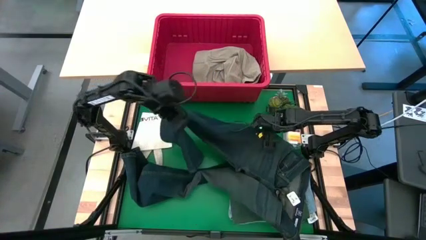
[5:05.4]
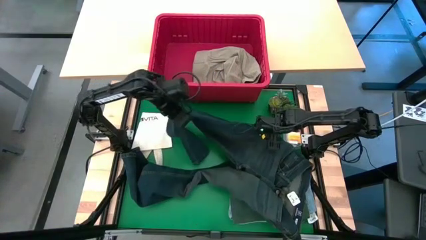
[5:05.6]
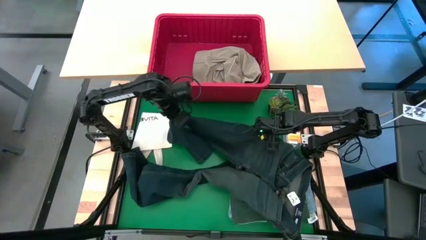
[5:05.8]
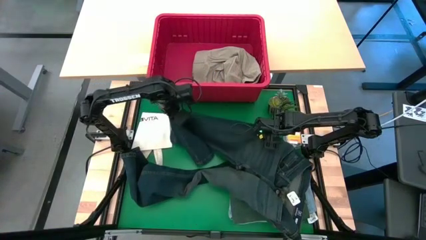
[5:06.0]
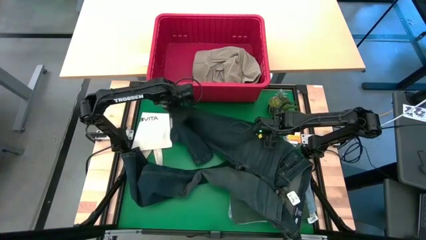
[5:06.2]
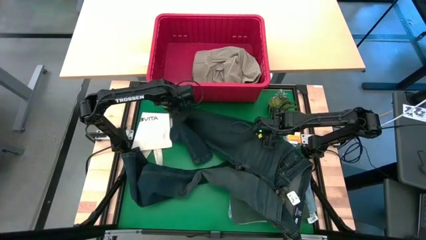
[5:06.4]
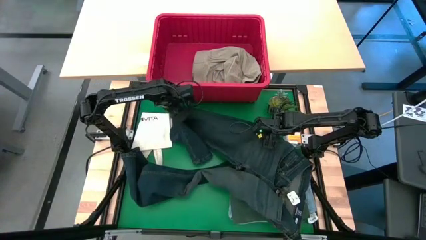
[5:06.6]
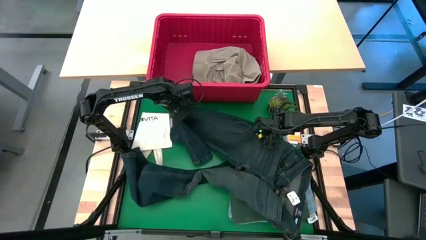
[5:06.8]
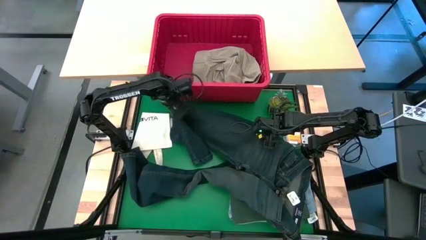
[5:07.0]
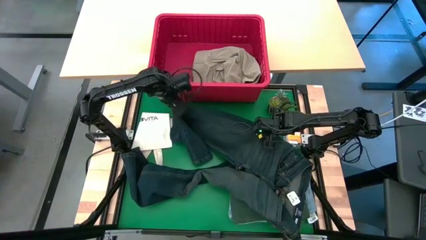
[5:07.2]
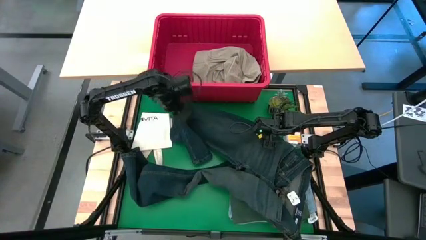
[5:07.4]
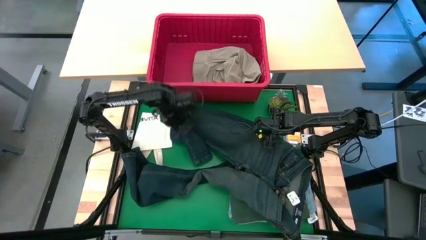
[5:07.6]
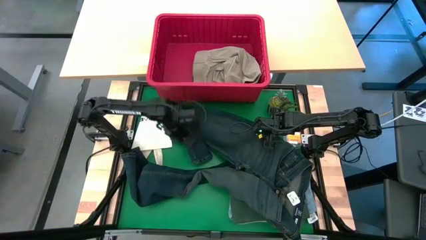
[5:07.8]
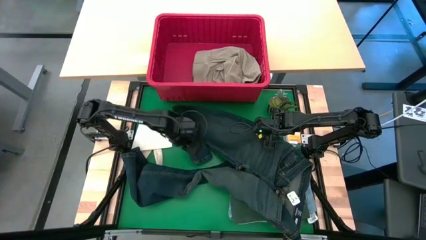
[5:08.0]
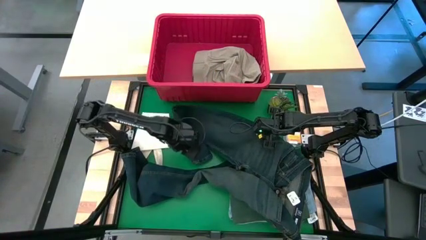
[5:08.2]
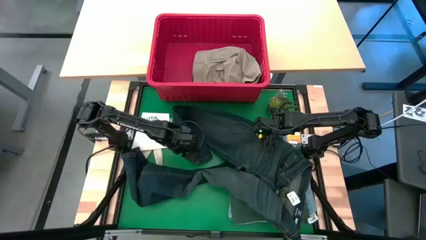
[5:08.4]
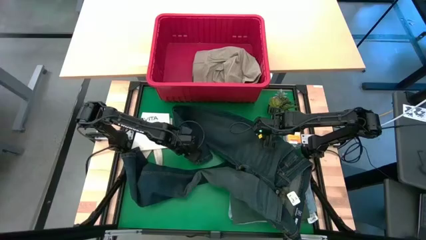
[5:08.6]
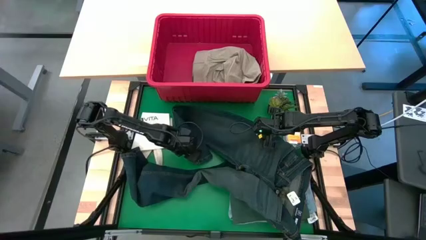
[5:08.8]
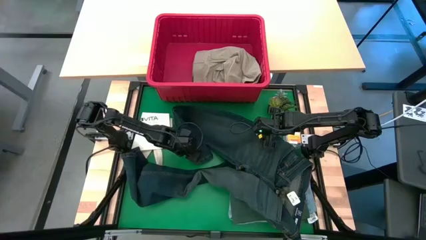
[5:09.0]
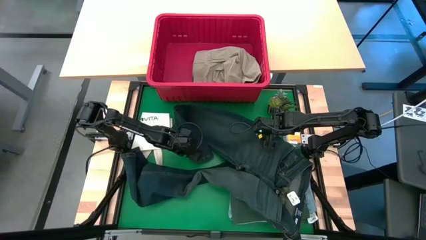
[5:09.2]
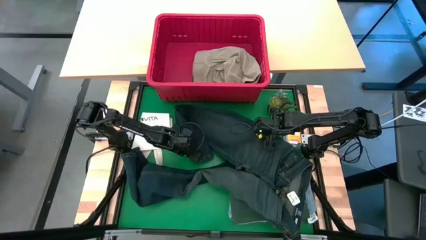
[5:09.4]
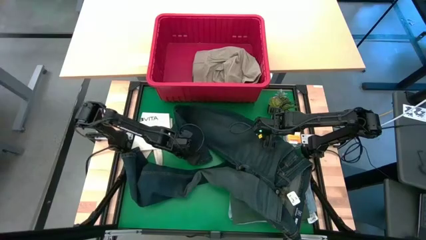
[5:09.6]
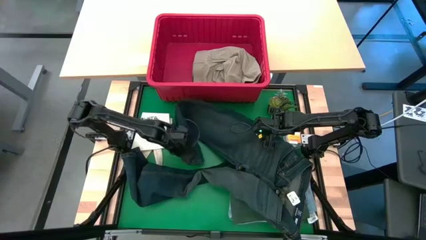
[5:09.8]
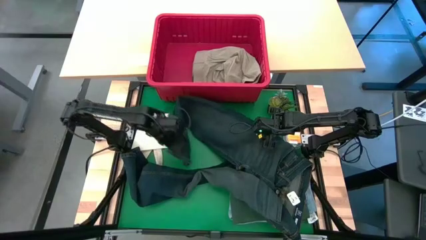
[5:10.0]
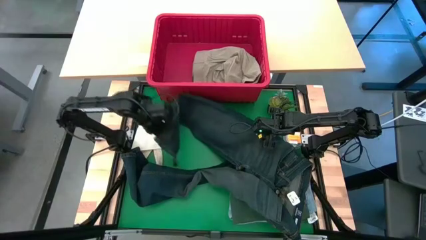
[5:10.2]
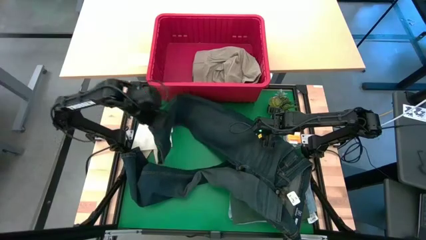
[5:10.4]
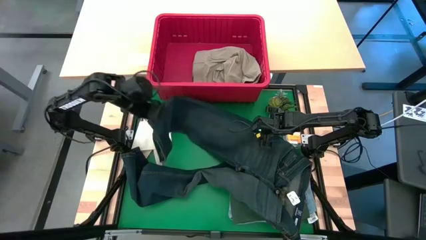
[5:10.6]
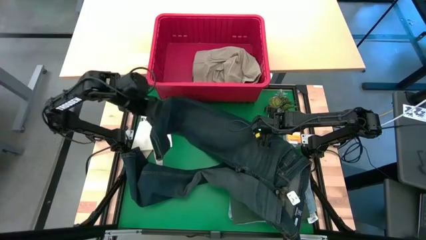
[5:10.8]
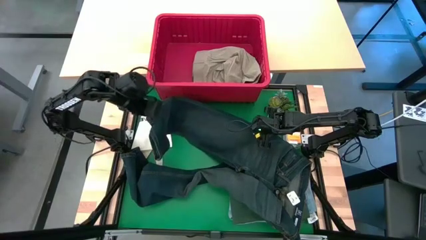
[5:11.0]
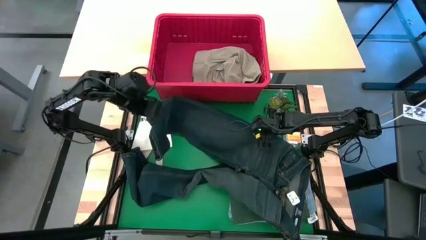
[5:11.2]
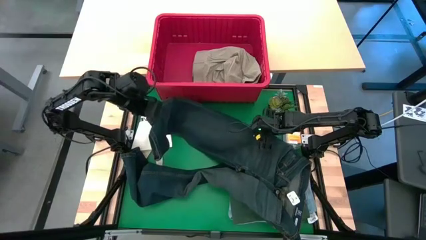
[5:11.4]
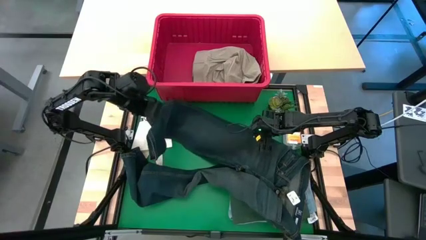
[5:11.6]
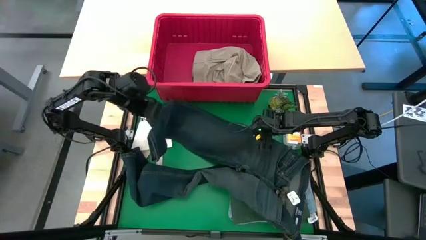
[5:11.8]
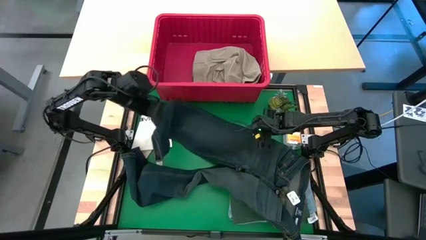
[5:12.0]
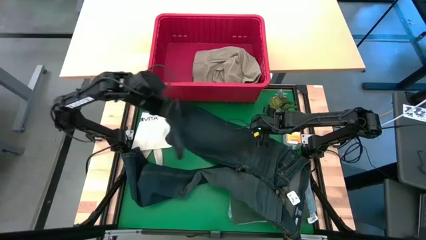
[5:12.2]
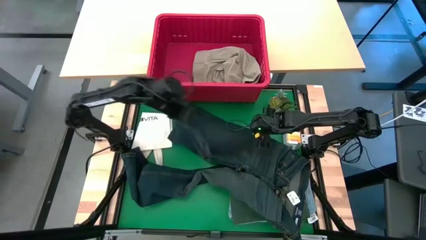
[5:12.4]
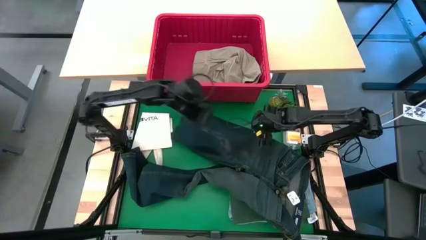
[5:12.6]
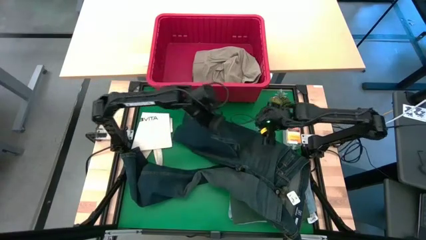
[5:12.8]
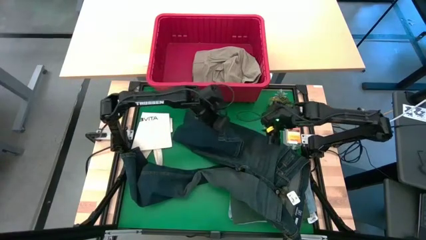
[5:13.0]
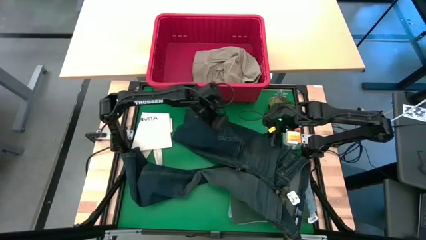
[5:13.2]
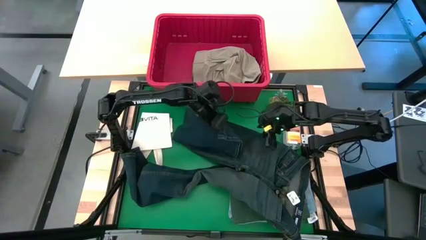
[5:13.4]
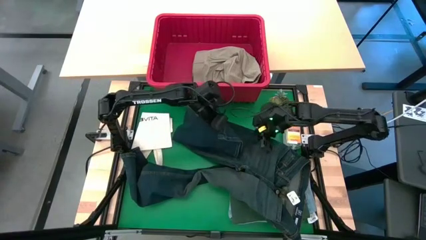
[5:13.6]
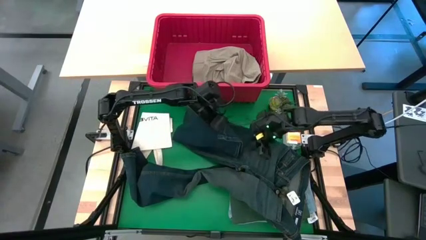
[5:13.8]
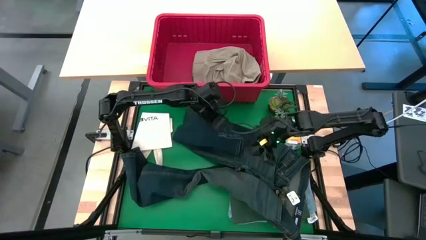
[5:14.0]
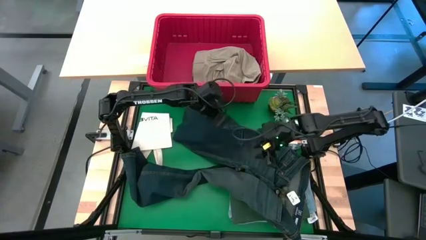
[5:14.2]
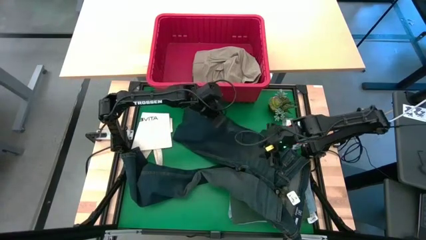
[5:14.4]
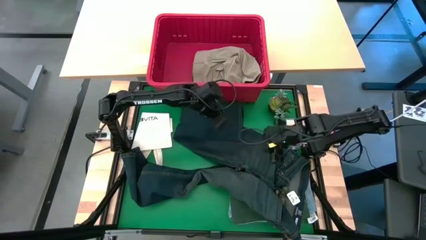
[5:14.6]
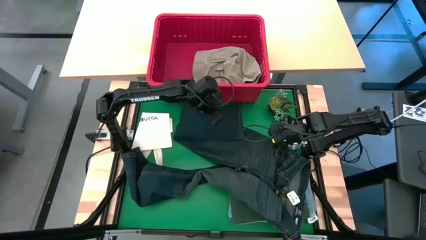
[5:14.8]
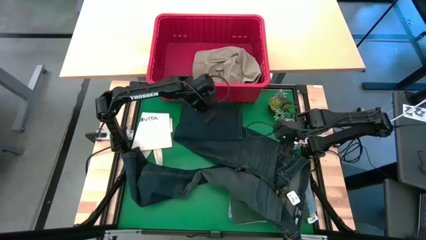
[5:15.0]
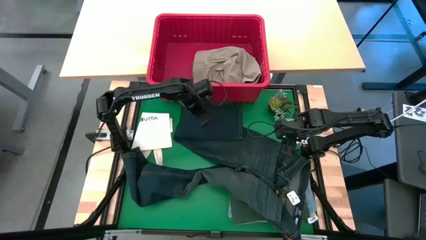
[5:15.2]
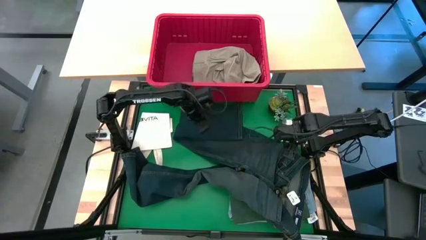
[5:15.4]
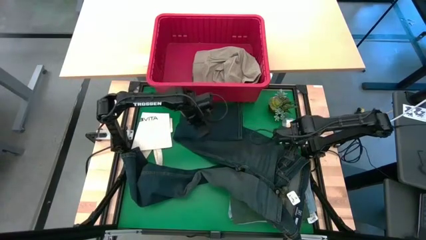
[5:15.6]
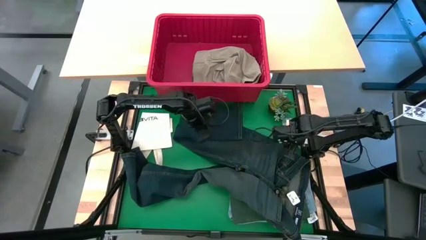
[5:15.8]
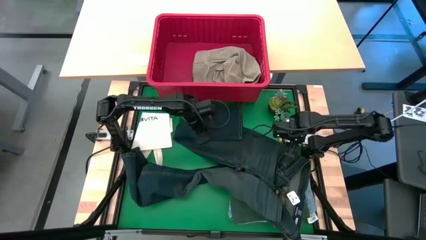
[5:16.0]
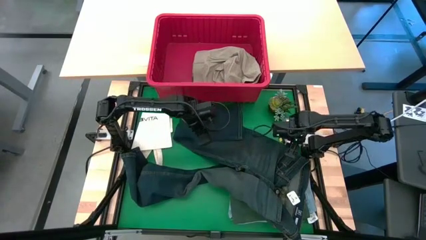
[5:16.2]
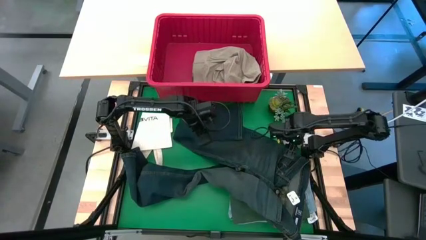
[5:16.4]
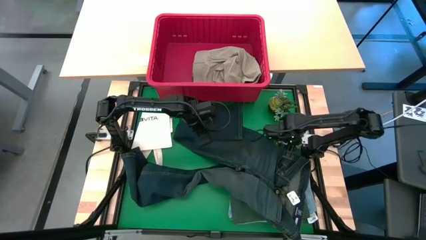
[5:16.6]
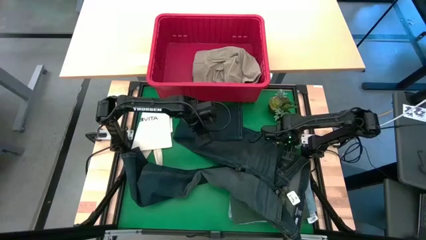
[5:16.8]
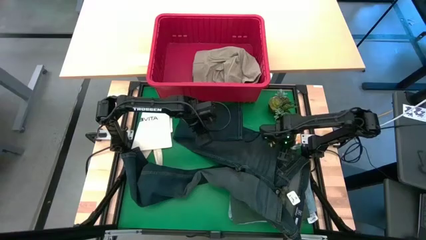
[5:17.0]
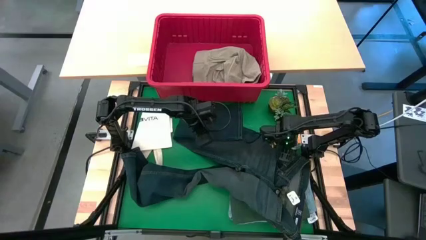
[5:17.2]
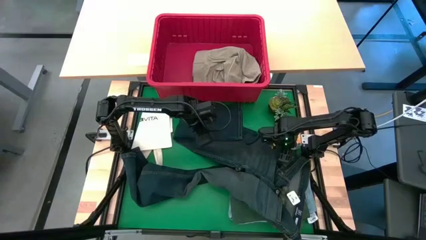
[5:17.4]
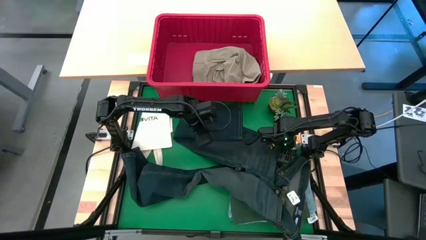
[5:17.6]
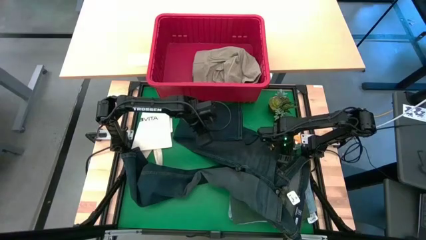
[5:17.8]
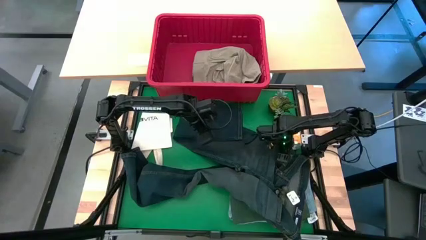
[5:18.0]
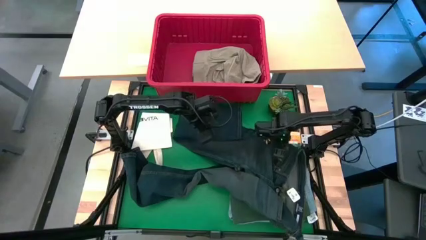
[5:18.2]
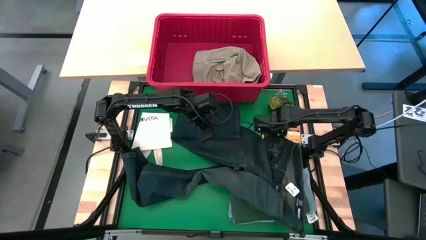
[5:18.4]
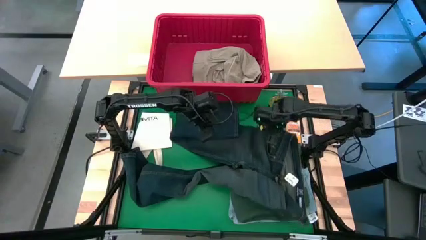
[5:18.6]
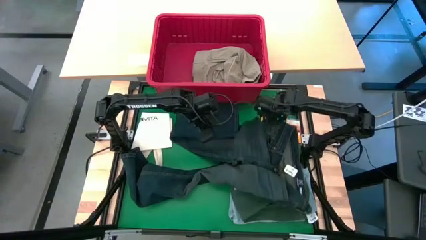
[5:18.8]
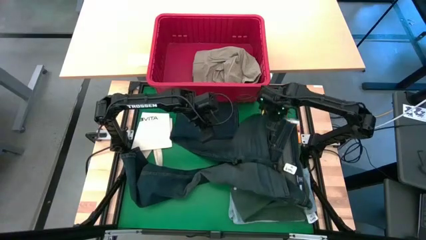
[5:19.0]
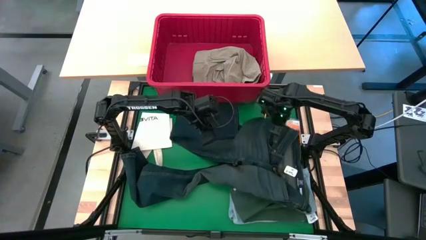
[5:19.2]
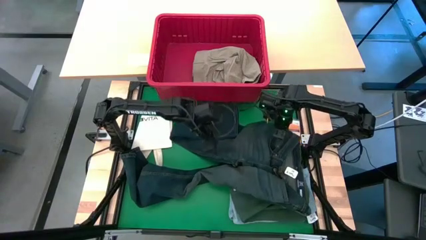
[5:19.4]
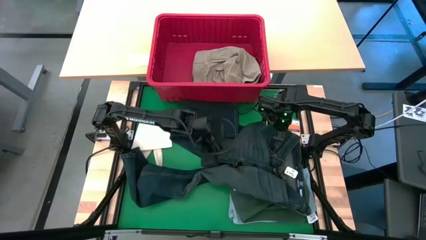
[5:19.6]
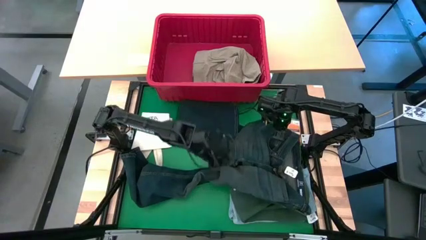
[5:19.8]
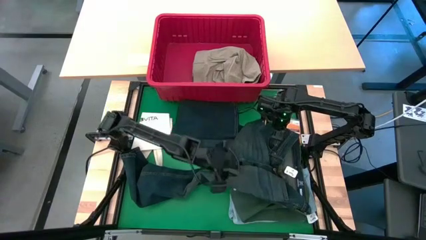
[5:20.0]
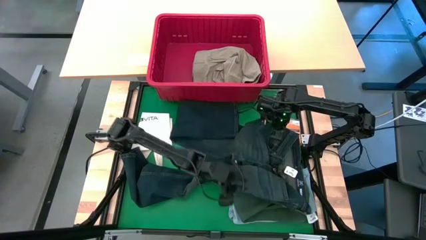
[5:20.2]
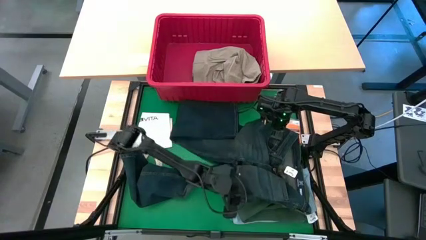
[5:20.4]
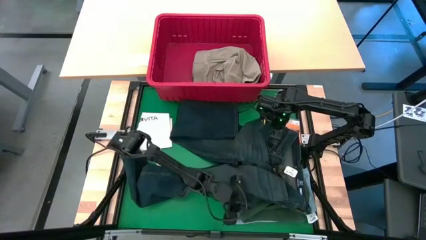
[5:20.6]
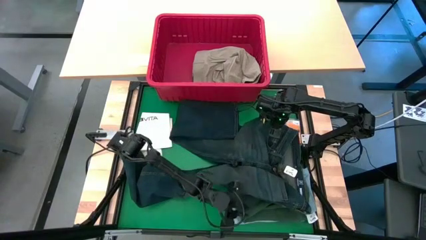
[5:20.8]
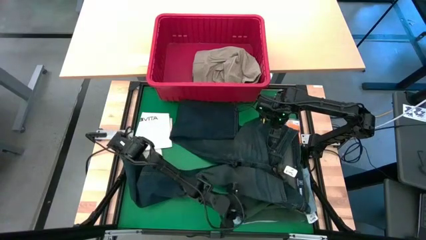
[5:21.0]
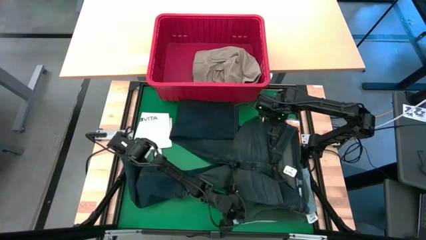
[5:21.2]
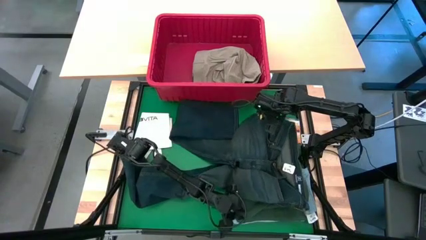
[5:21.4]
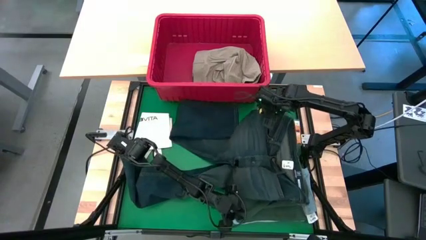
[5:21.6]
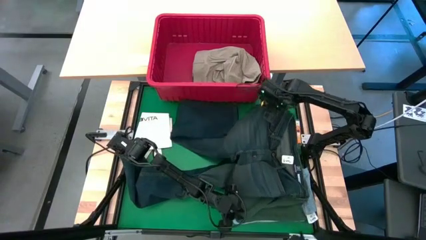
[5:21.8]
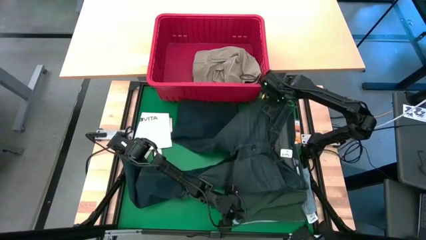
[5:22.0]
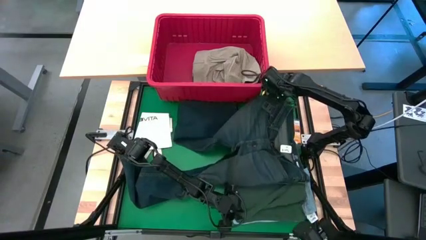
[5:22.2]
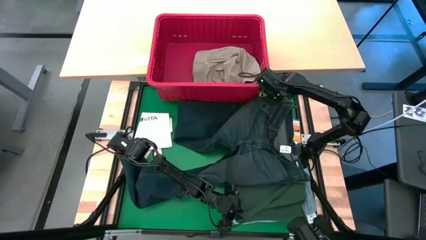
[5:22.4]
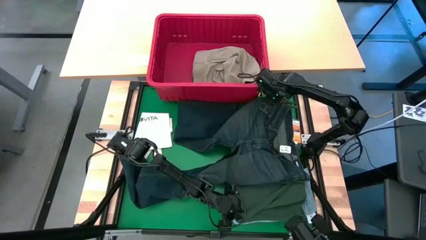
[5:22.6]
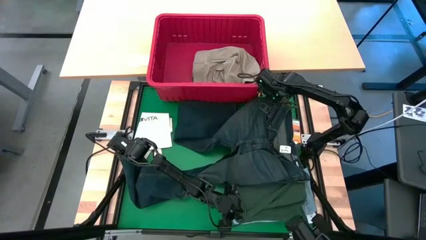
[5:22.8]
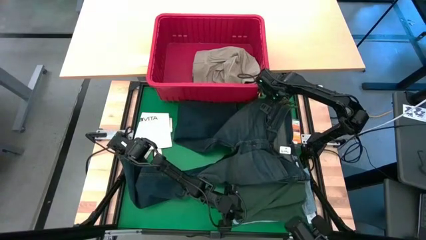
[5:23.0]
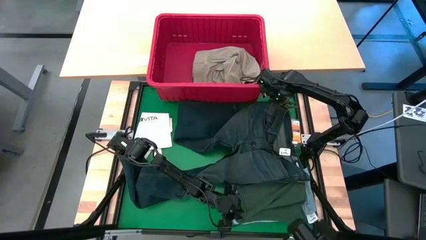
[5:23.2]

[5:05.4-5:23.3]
Task: Fold Laundry from Bin
Remove the dark blue jean from the red bin
